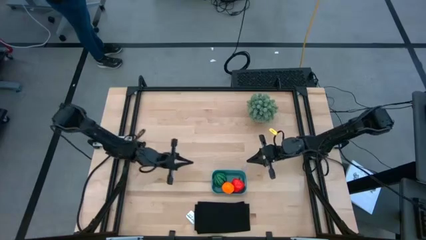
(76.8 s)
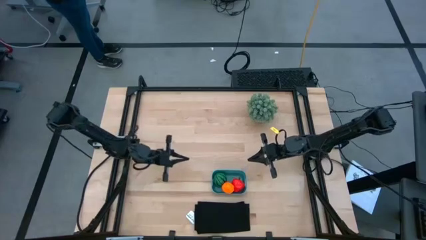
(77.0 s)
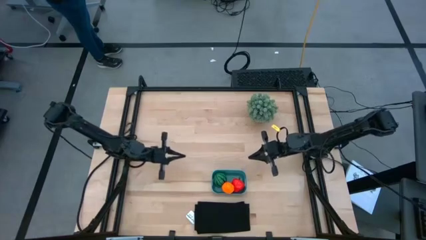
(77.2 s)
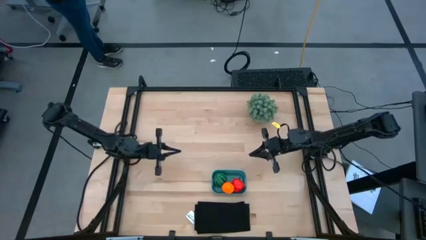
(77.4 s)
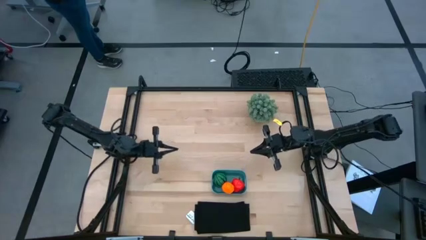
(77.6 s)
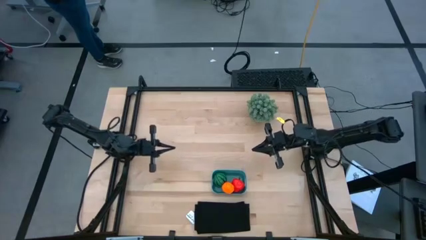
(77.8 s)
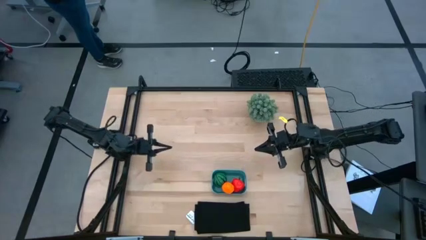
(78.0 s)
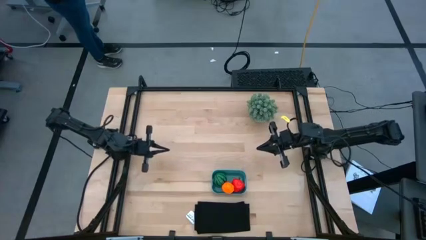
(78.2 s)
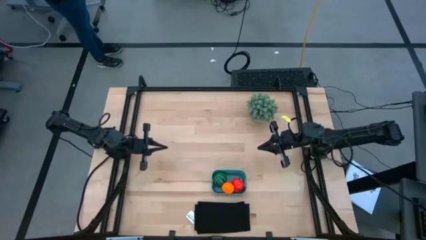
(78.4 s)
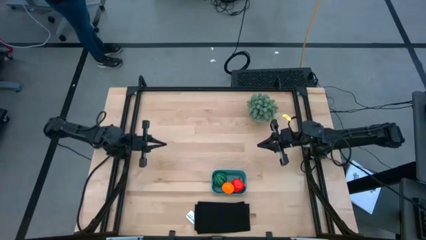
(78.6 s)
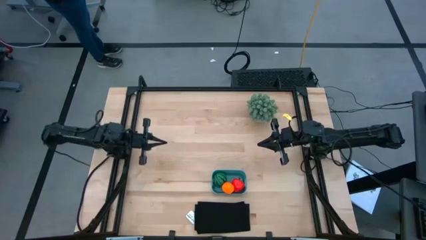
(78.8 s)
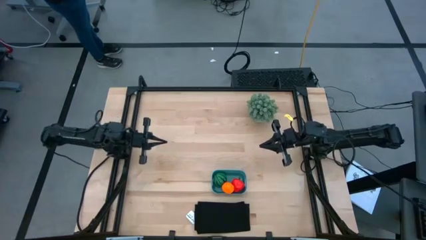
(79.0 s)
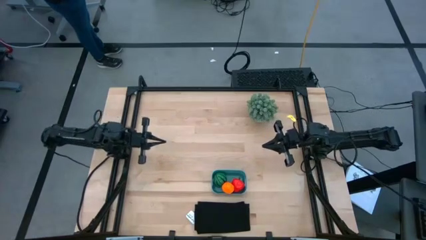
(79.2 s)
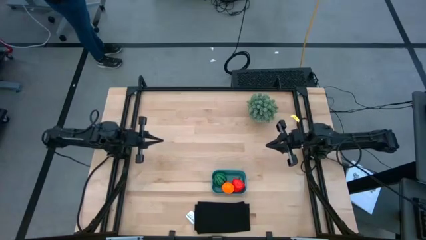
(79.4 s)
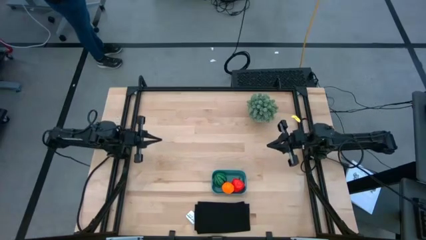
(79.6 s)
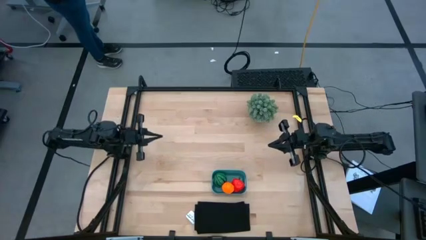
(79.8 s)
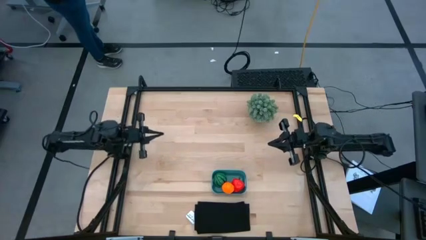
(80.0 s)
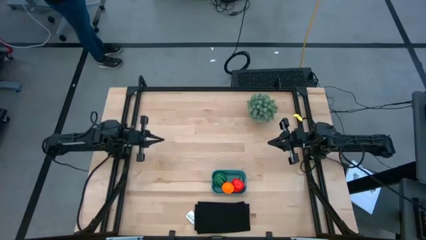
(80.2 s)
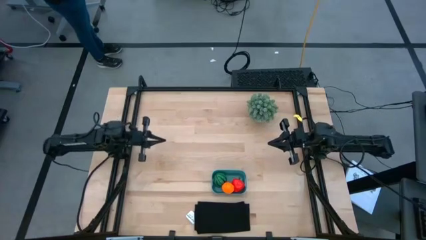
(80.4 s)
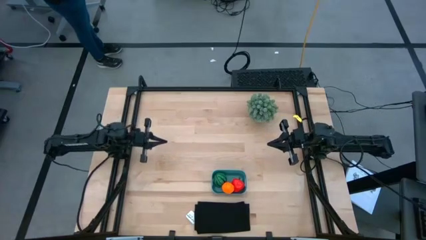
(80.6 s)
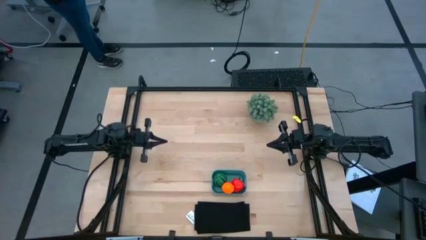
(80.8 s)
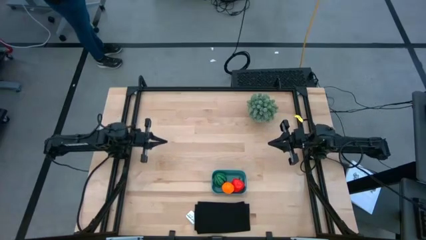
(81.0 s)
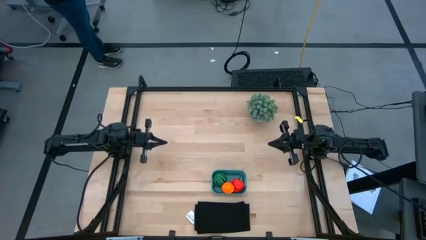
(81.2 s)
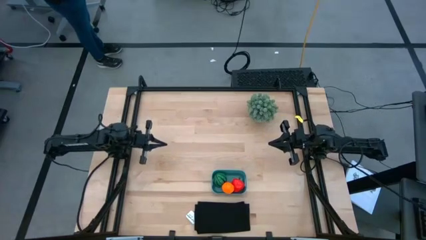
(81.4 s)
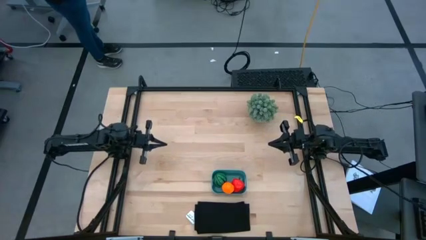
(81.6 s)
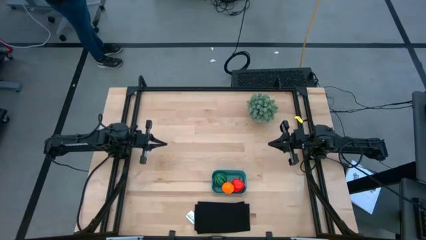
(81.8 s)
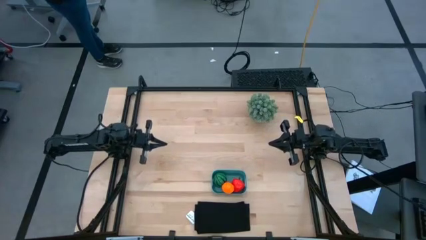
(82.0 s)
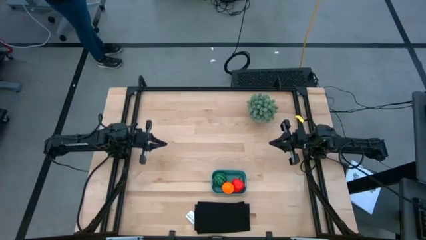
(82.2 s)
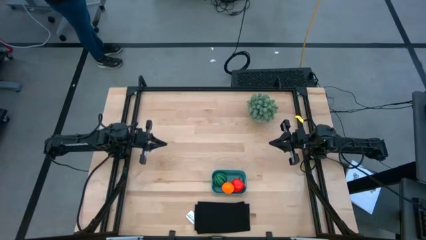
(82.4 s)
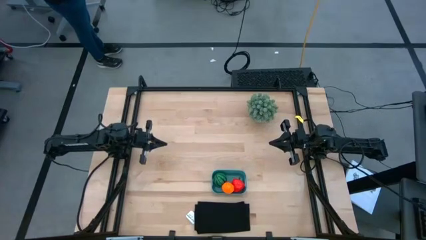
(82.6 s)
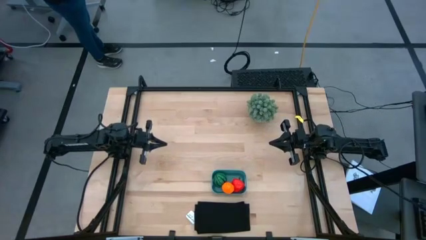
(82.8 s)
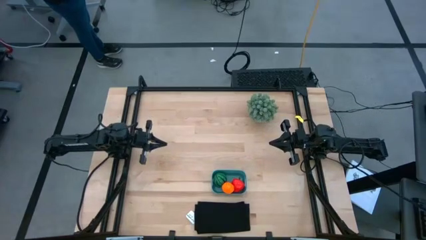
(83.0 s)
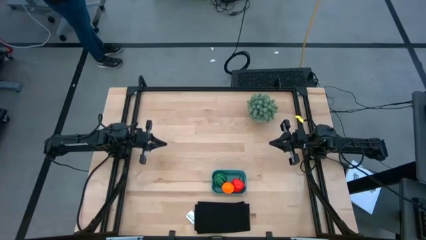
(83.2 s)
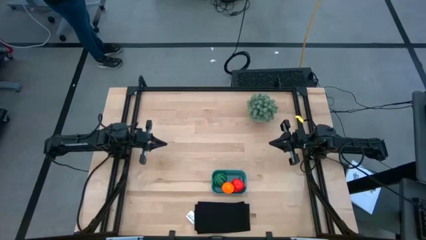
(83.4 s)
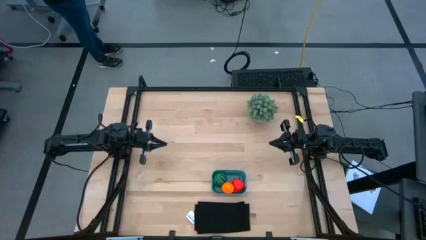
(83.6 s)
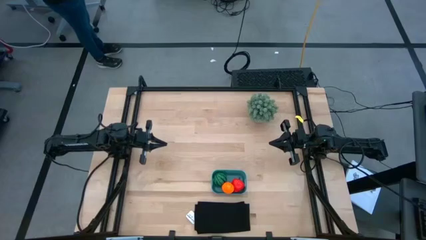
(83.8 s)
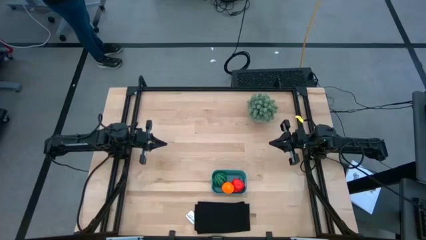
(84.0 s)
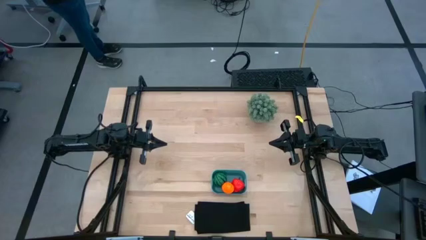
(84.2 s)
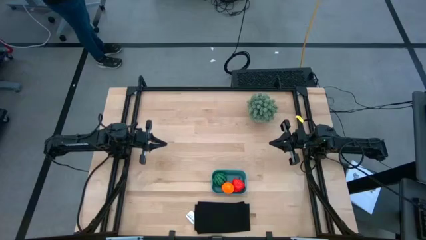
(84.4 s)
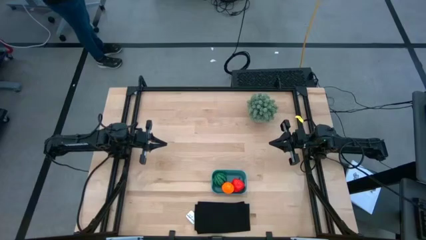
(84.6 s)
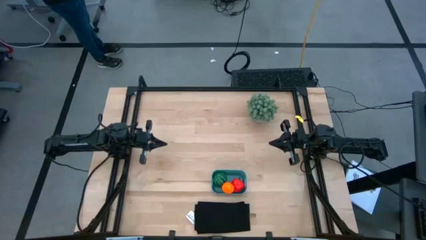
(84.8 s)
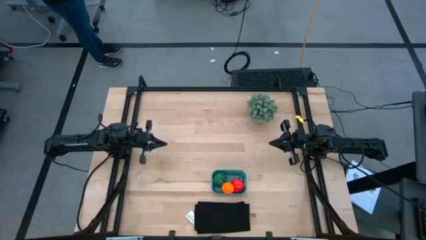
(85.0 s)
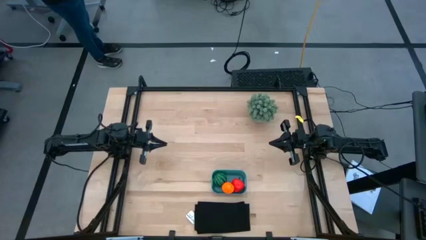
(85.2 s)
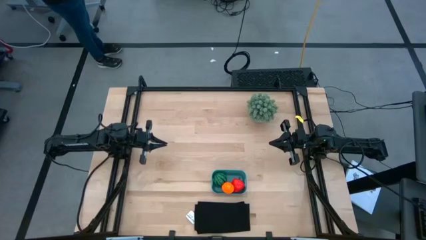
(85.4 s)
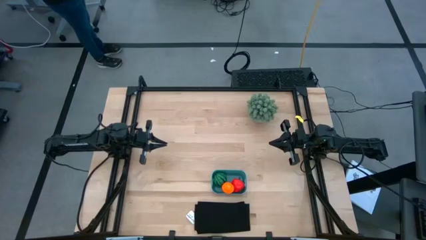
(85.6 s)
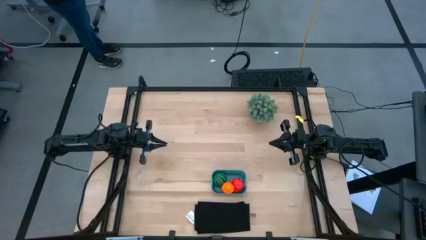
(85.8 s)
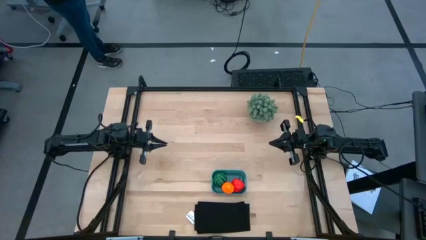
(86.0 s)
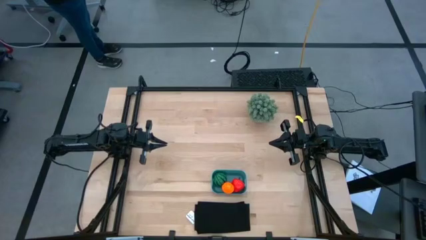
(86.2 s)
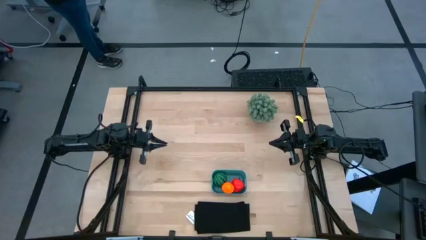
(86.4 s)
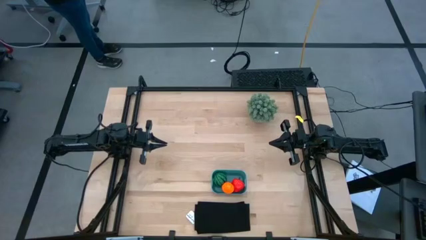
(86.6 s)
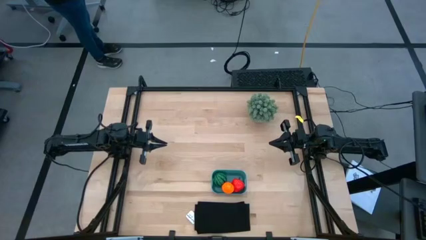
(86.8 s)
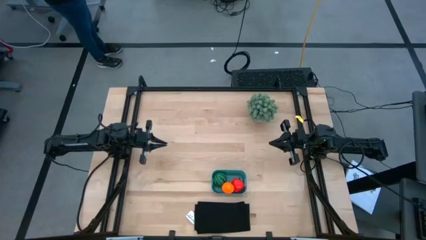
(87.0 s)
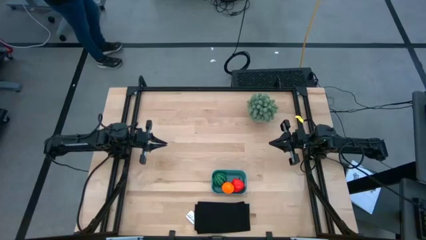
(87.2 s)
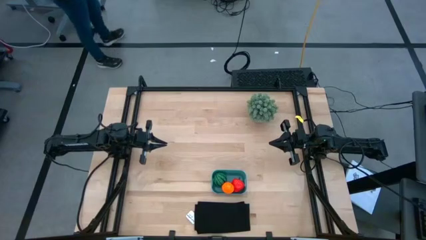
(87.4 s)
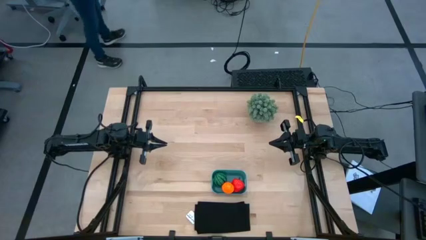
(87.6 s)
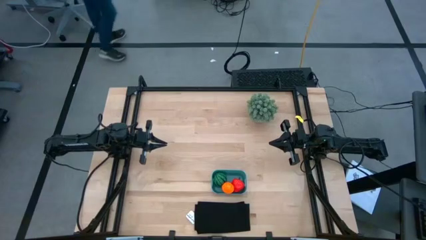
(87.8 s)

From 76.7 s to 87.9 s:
Task: Pick and placing Produce into tupperware
Return to home position

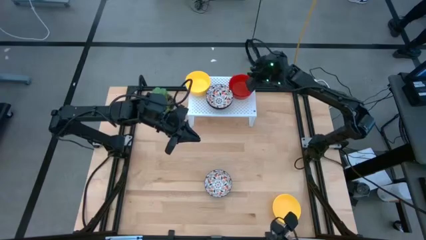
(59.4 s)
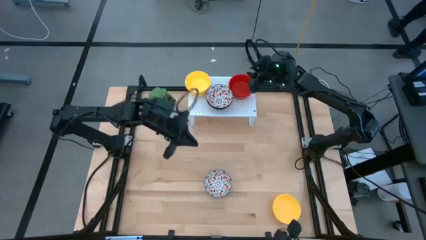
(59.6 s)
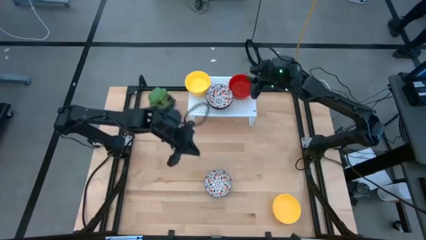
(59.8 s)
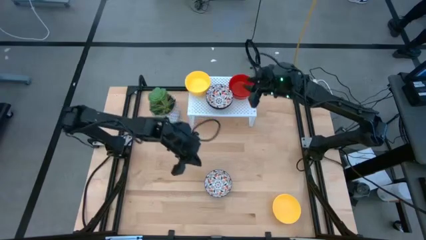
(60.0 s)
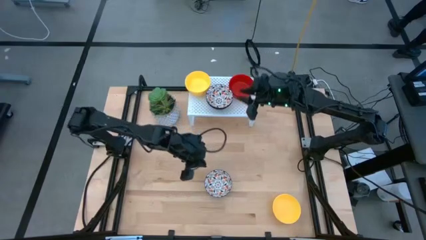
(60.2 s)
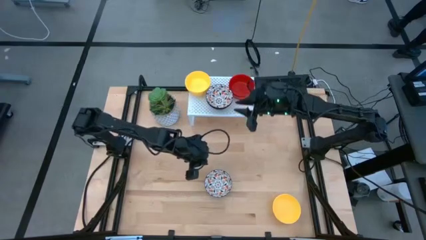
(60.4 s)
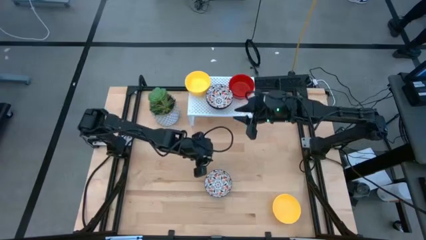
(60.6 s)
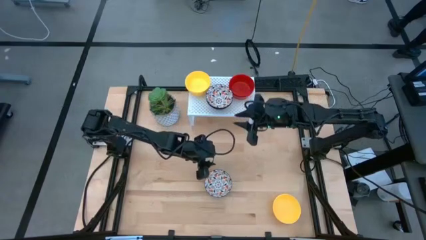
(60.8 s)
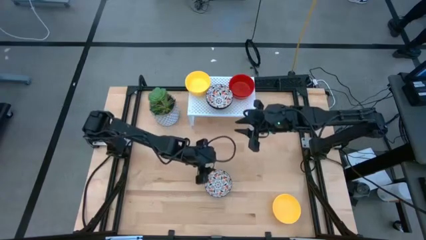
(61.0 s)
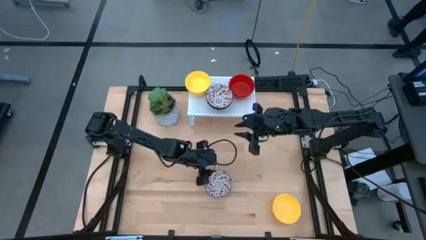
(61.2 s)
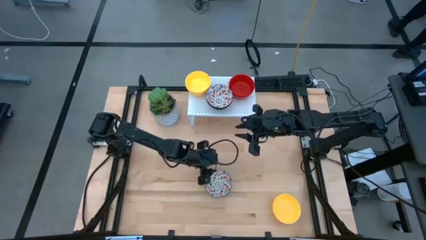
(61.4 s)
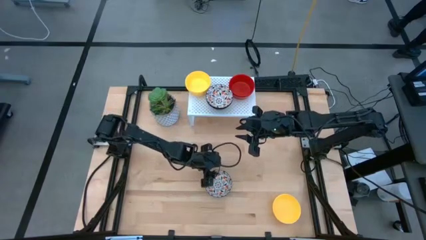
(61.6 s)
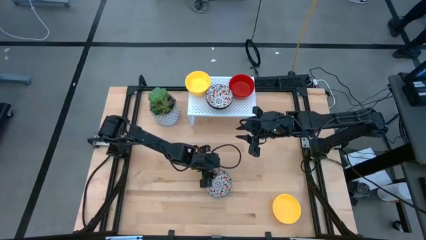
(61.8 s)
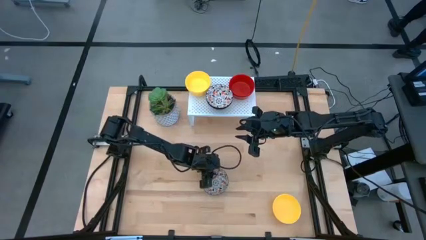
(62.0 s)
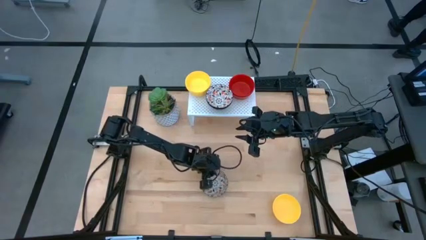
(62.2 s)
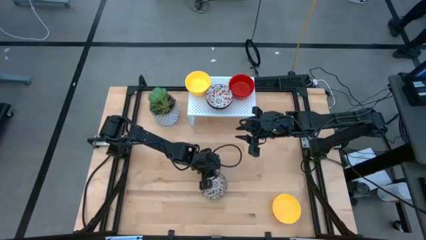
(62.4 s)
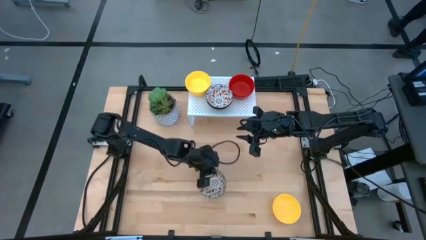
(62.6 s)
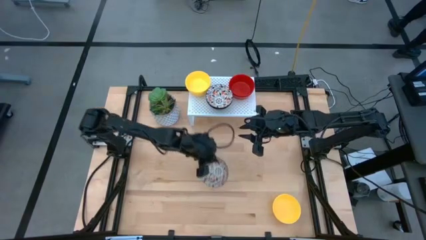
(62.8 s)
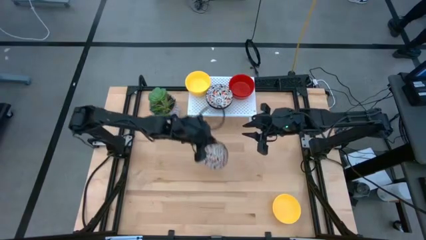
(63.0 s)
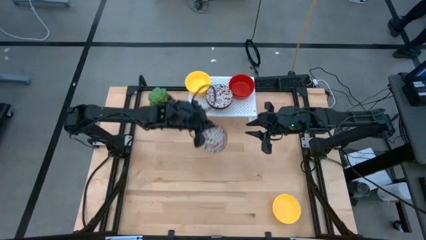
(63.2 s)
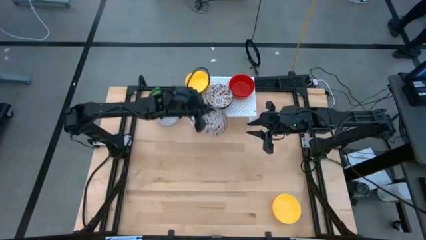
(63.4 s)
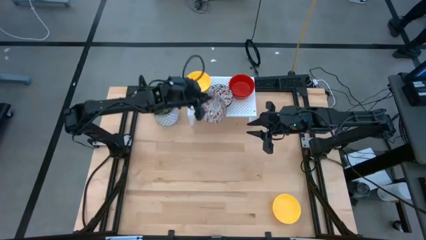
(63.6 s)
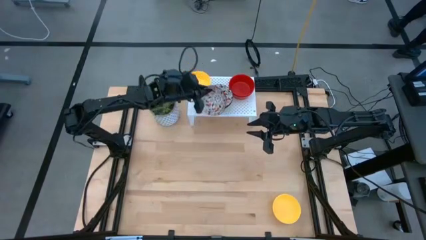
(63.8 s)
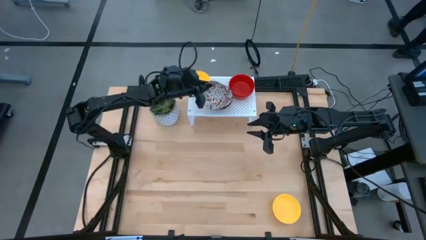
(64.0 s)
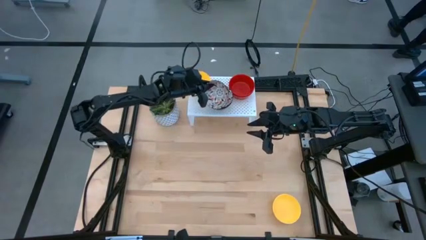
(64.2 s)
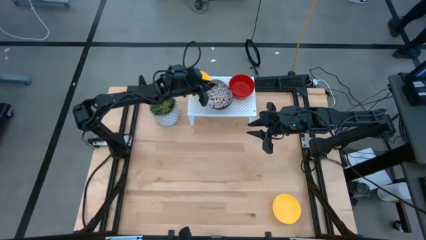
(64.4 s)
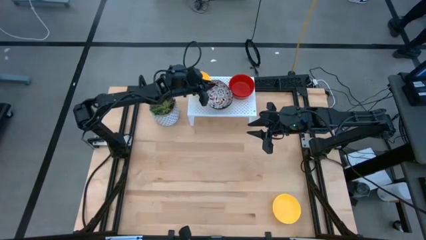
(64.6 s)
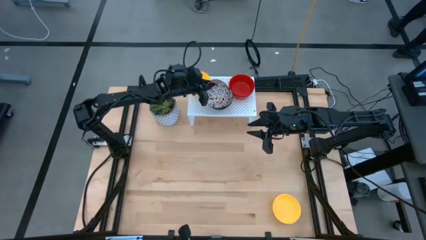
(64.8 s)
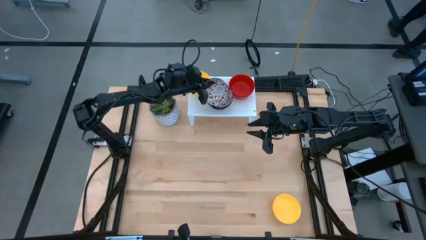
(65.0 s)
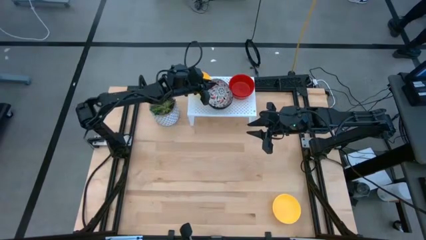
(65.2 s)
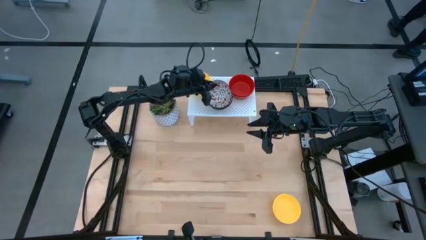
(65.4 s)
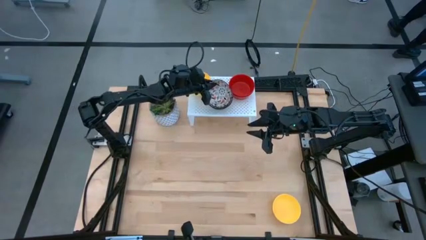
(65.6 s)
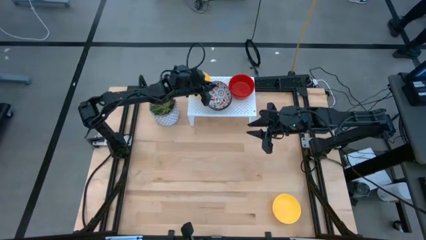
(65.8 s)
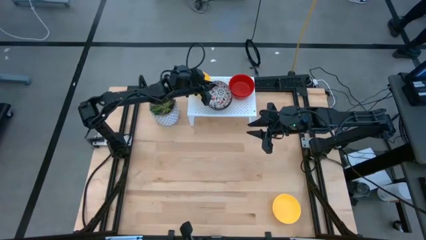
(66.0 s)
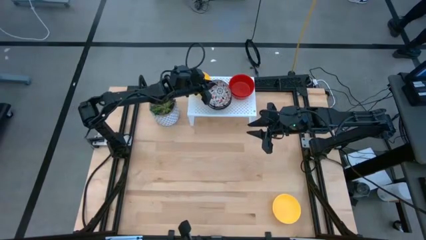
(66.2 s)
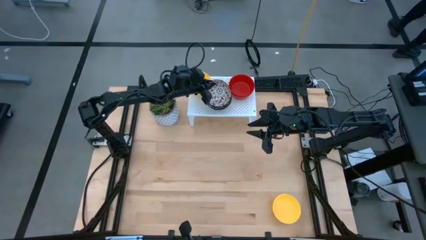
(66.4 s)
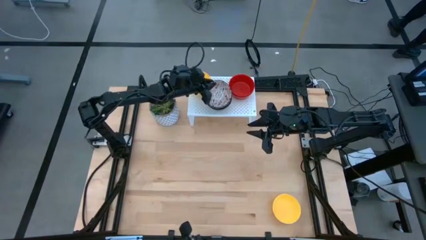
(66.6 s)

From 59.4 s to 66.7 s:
Task: Pick & Place Mini bowls
Stack the white patterned bowl on top of the white patterned bowl on the shelf
